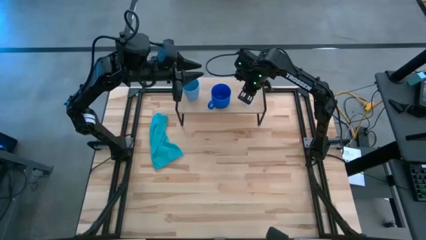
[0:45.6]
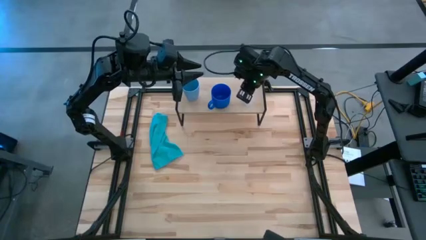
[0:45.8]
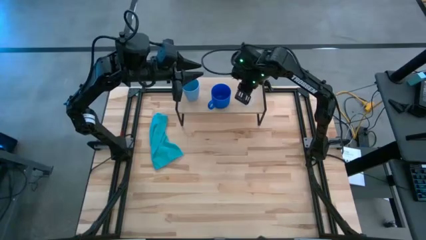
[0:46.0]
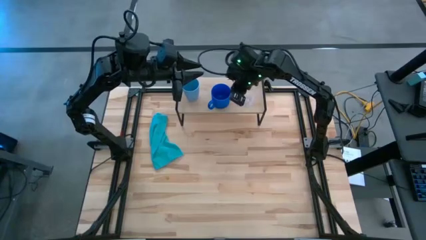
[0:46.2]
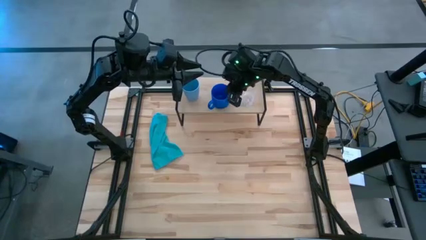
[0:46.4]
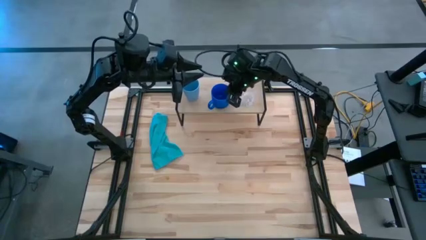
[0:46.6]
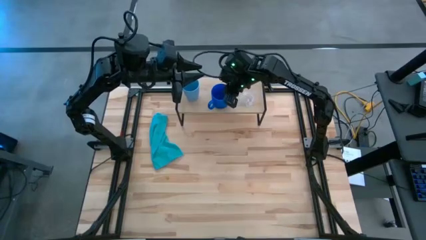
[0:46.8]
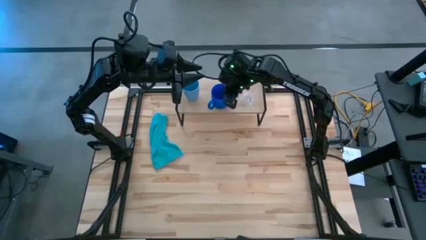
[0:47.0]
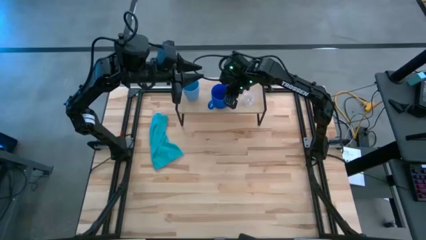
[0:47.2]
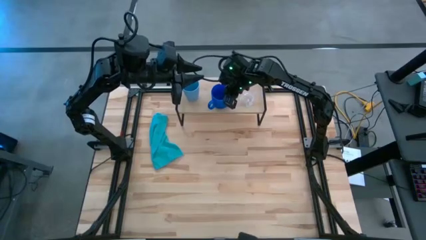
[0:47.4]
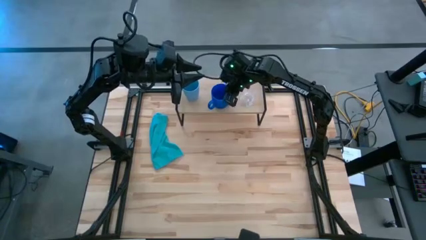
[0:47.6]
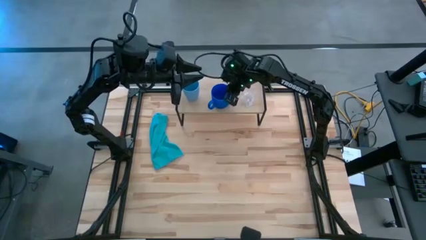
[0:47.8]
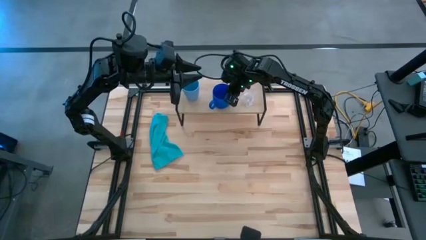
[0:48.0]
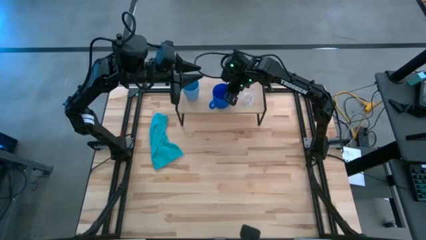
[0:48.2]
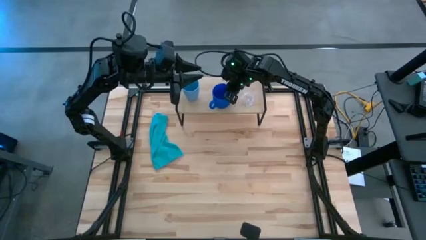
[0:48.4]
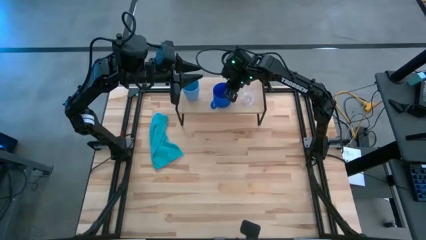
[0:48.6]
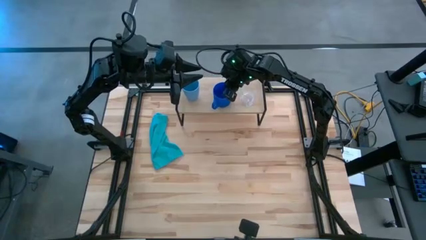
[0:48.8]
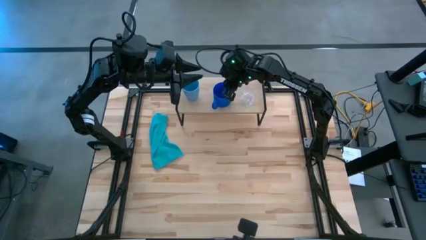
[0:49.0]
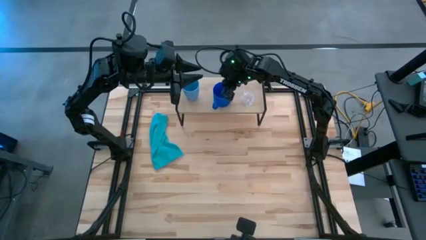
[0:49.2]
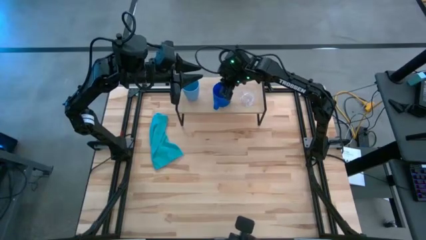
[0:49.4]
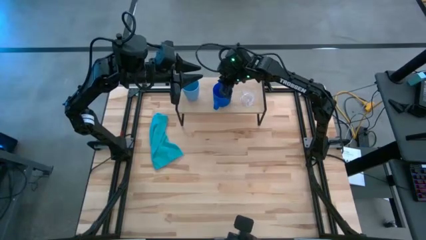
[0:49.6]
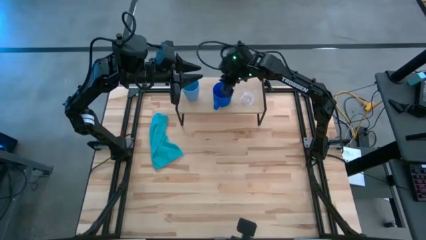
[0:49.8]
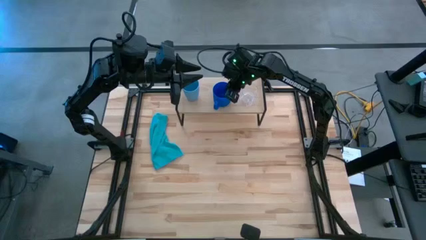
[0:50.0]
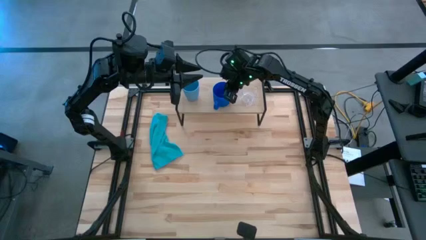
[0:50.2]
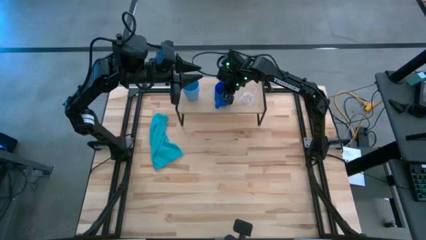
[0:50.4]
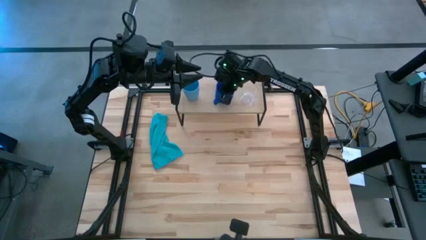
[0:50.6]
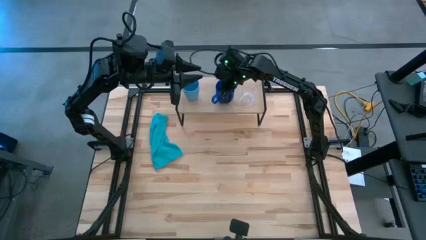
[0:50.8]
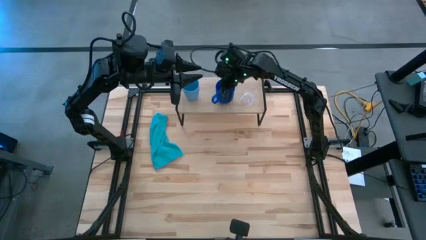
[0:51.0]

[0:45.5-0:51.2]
Task: Stack small to large cups/mugs on shelf
Adjust the blue mug on the shelf

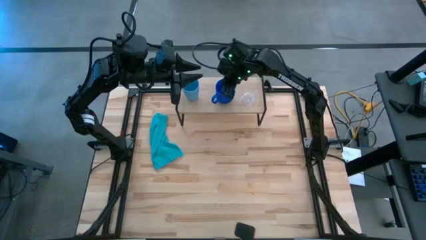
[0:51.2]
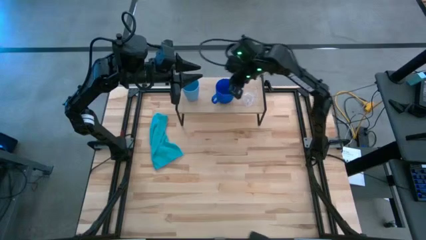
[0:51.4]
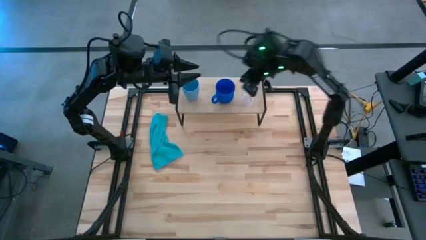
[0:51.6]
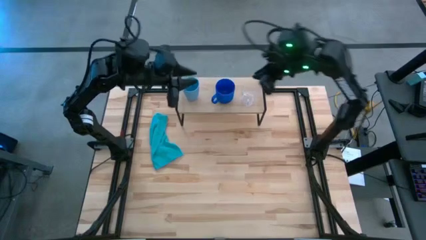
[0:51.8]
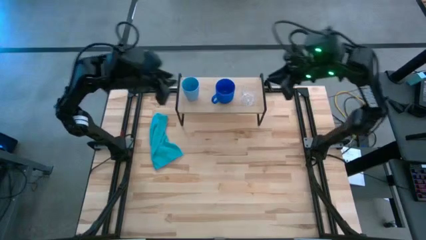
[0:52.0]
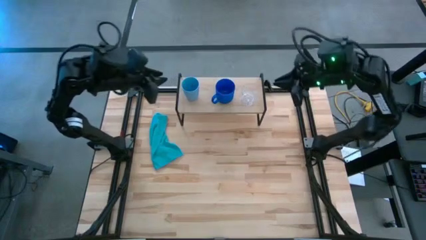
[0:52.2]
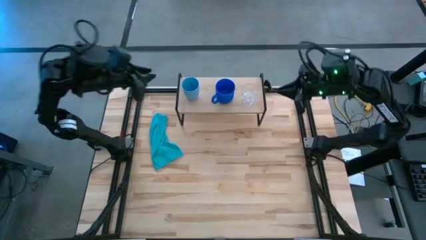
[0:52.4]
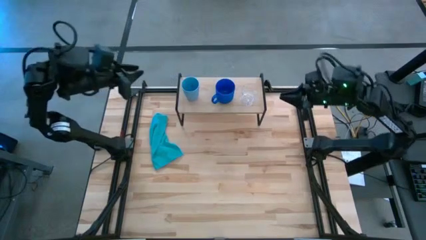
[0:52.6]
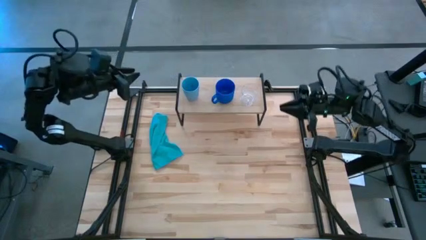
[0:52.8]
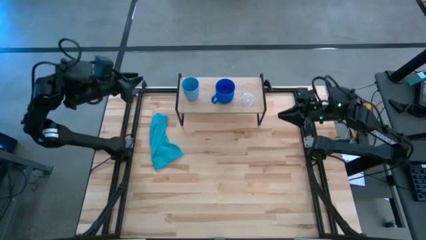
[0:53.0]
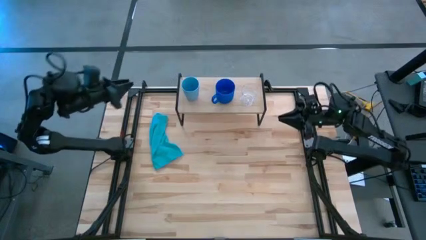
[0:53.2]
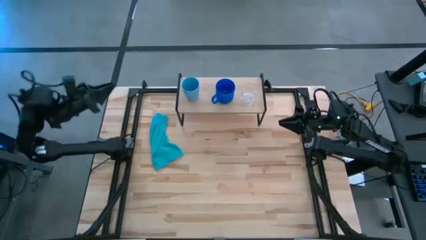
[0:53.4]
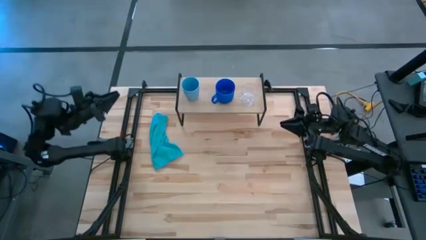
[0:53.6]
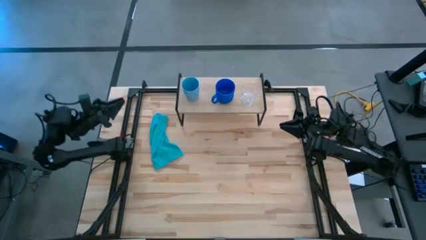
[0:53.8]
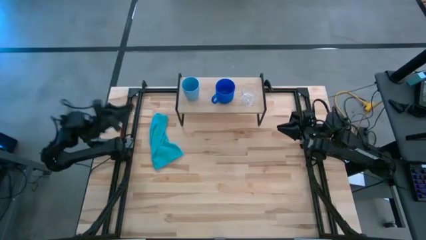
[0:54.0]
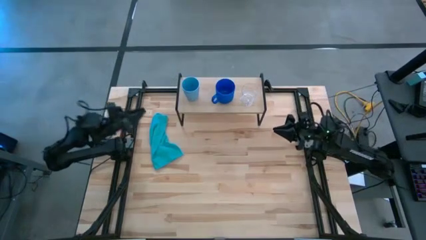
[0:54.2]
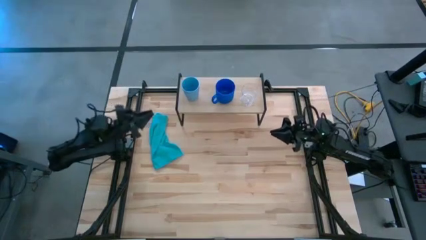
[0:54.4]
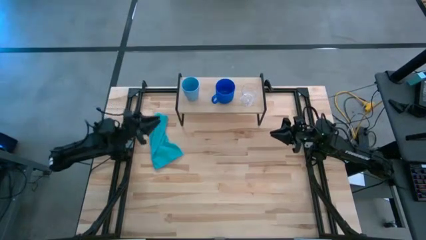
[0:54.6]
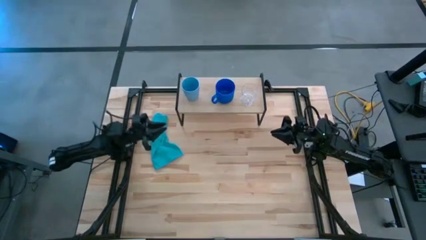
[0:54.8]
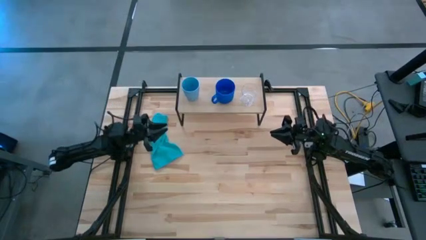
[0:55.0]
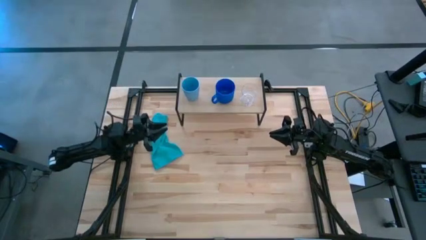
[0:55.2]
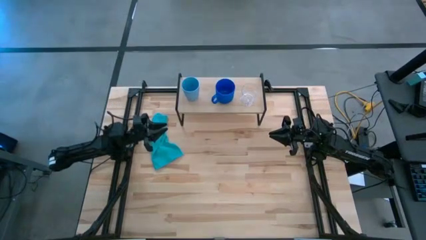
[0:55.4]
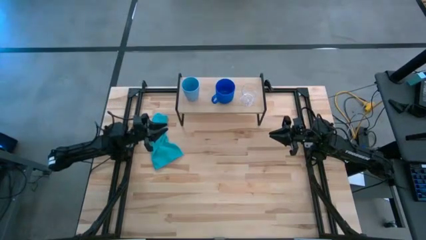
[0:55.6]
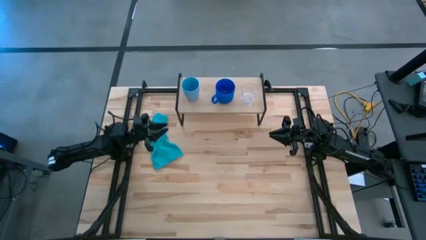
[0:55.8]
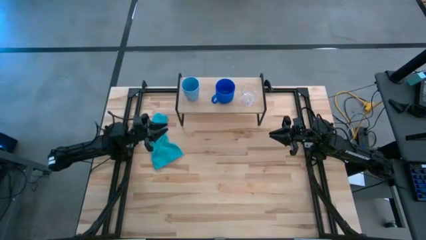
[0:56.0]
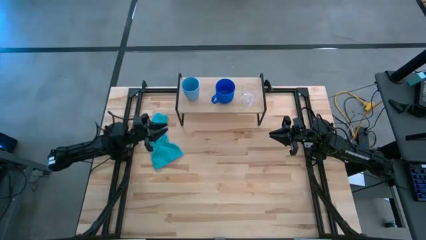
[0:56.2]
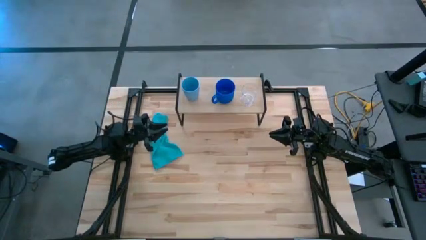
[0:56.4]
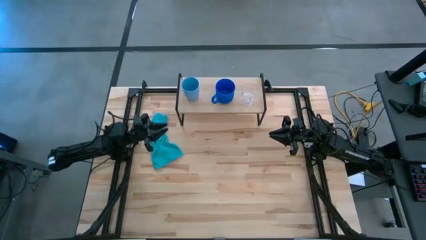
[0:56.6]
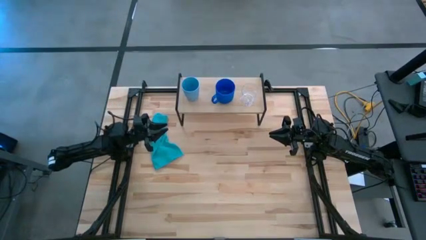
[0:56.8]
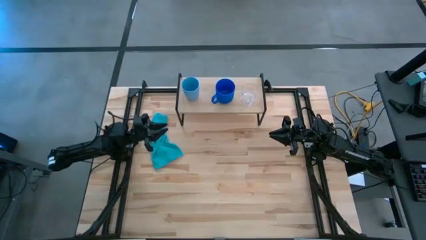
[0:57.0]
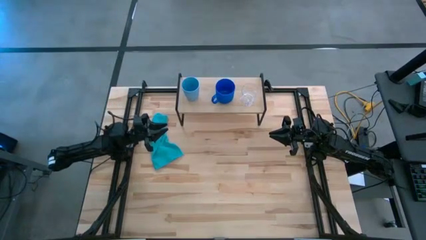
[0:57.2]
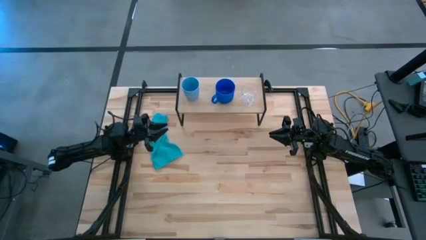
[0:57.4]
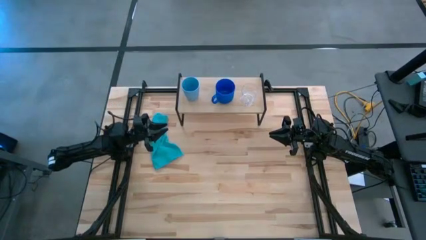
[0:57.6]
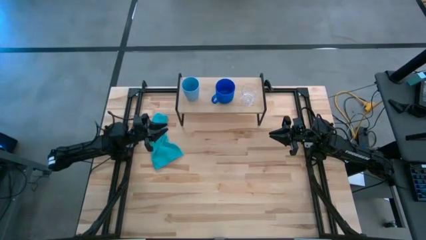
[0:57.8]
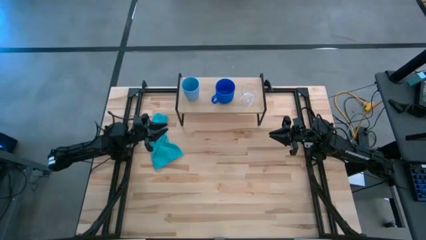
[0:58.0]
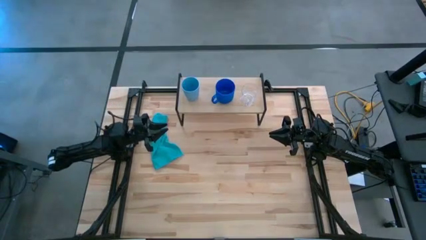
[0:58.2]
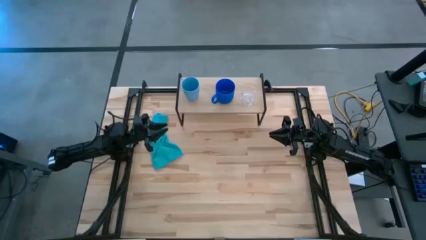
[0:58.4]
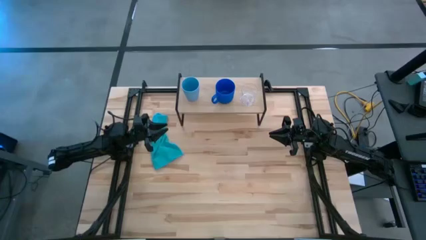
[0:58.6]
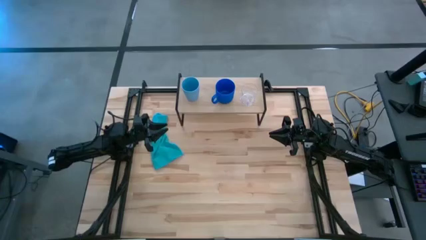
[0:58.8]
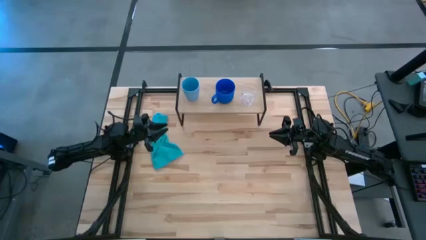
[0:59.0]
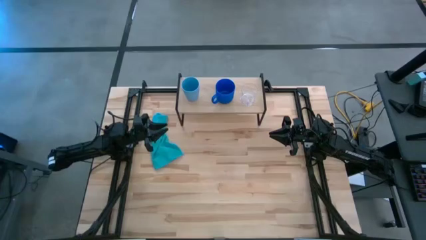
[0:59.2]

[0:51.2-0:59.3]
Return to Home Position

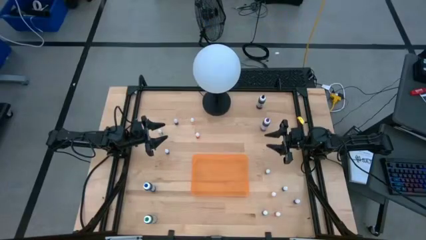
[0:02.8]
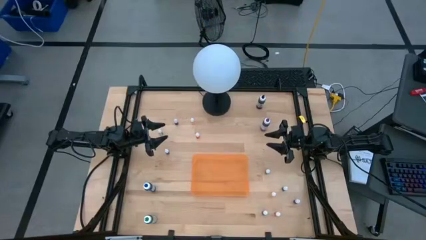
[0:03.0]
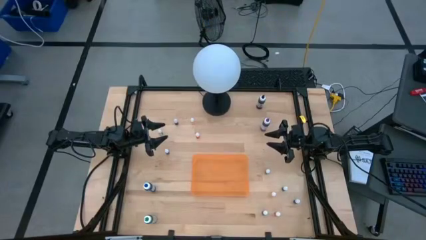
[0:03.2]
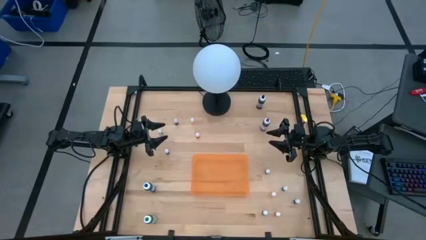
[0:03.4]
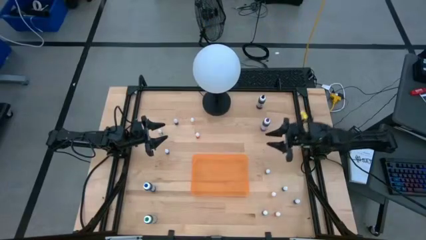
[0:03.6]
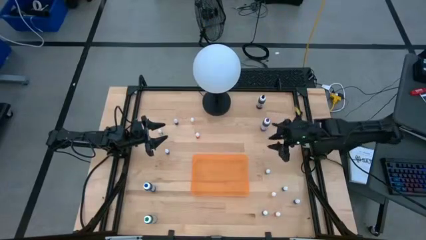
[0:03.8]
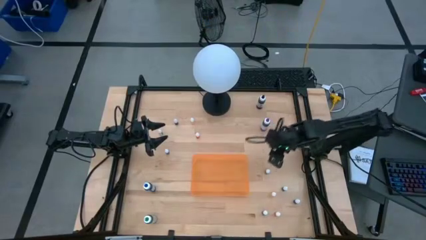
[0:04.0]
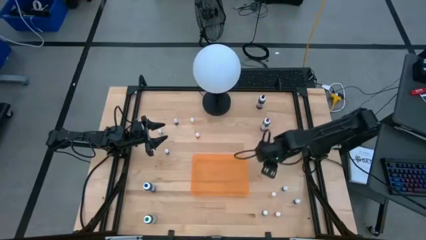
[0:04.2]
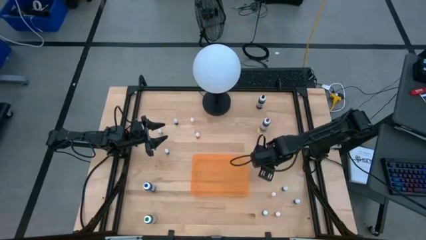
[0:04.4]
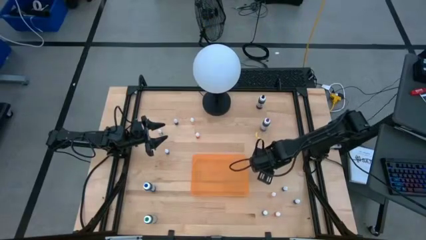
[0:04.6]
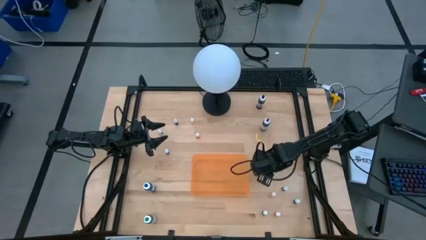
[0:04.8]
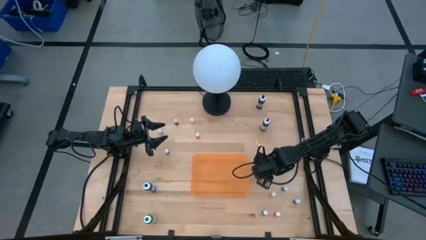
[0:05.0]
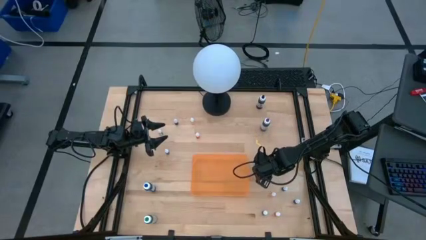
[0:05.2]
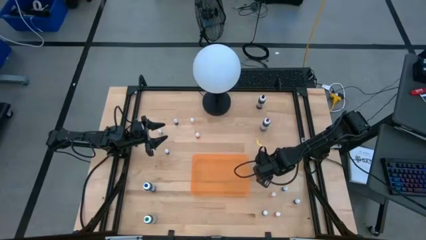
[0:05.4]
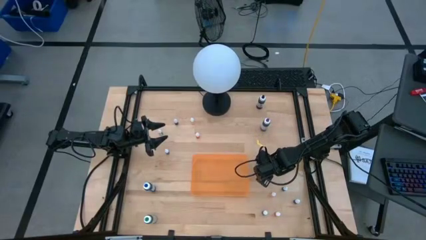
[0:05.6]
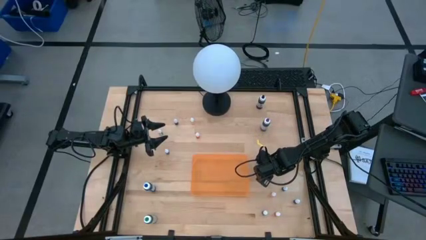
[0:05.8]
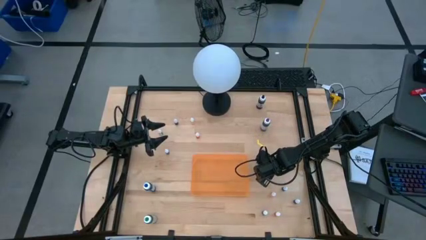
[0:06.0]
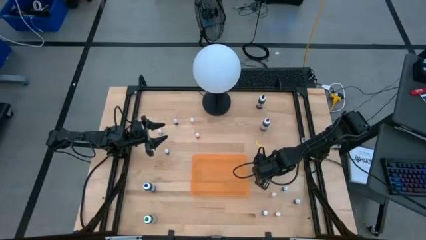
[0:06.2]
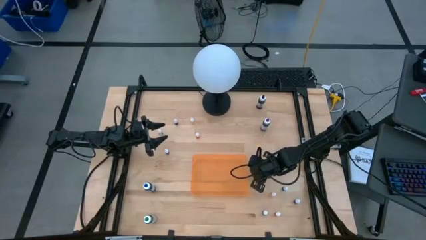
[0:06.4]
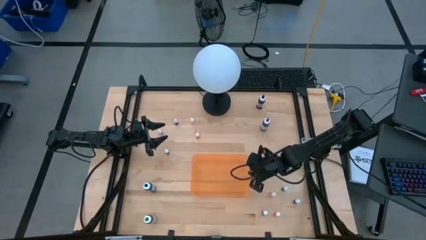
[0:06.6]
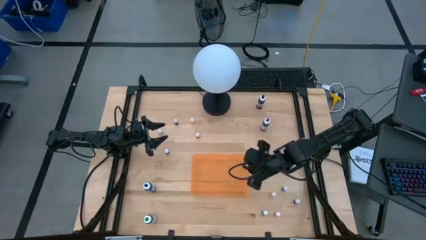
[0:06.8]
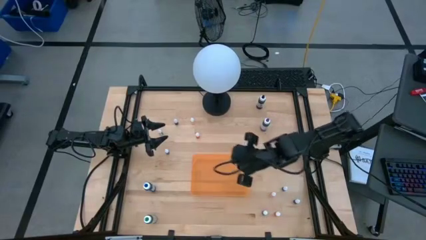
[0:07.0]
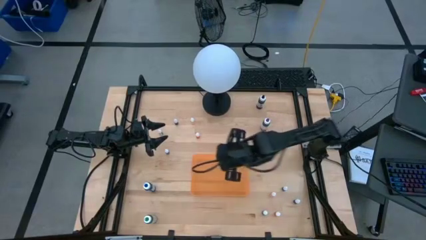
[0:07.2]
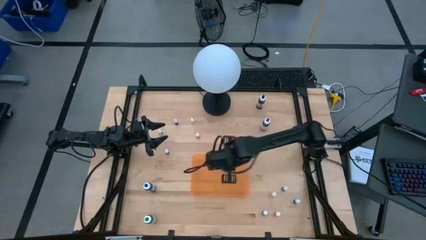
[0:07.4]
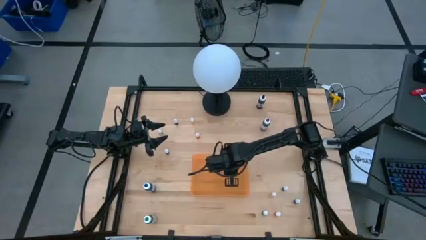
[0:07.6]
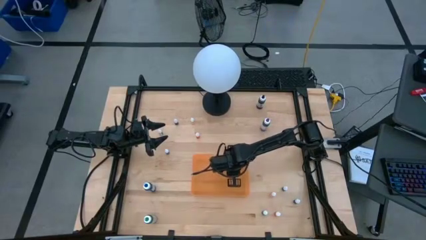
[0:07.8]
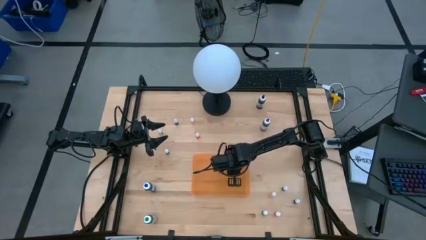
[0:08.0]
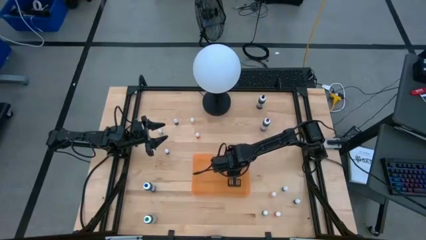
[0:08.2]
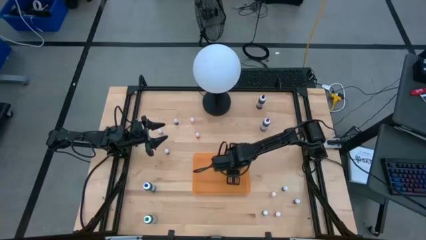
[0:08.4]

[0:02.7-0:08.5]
Task: Pick & Place food coloring
Put the small green food coloring bottle into the orange container
